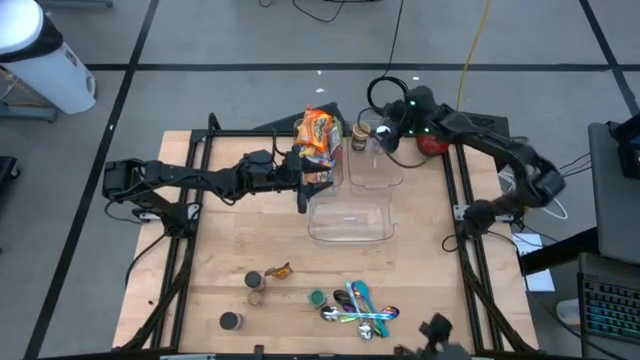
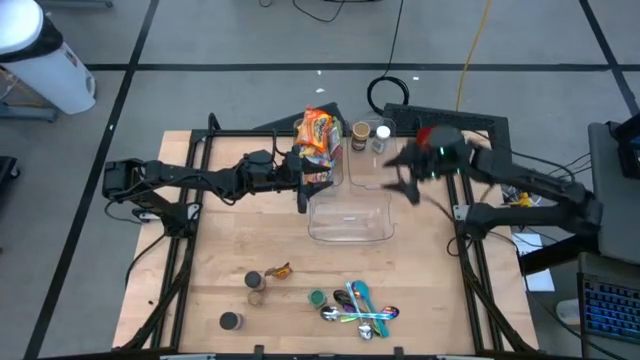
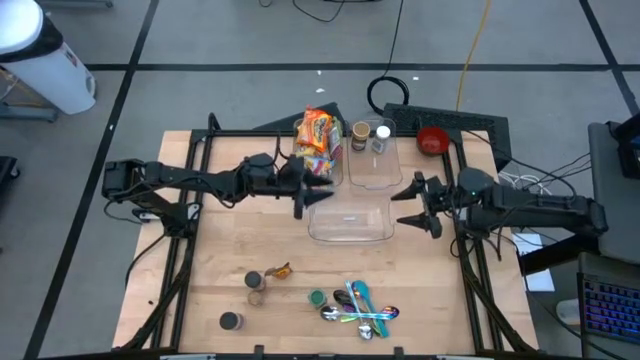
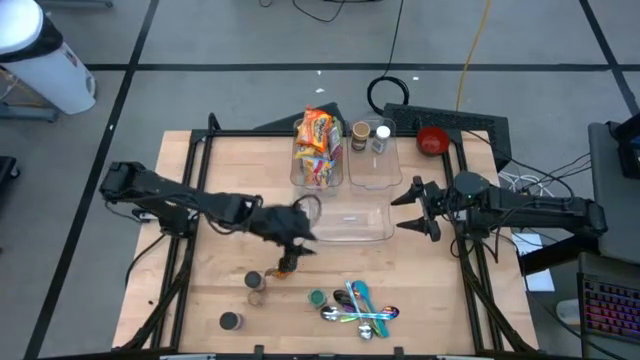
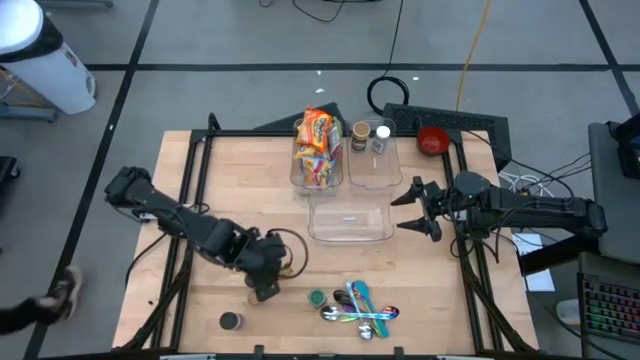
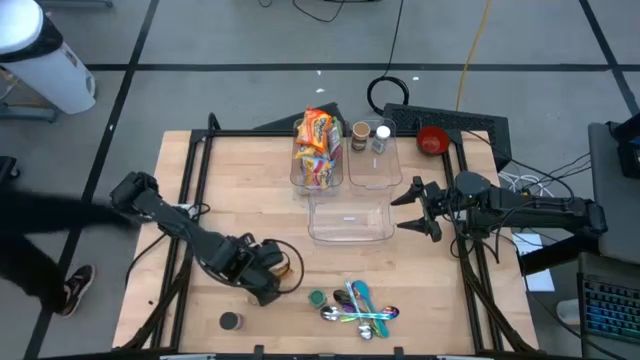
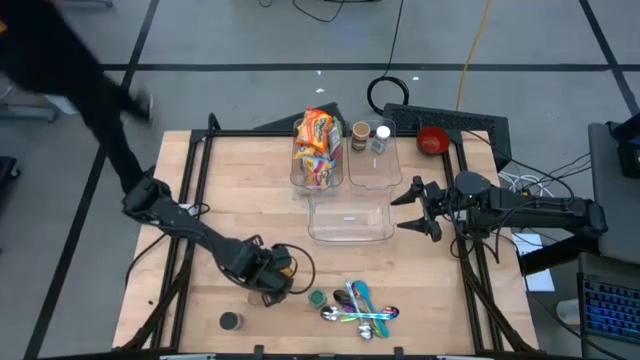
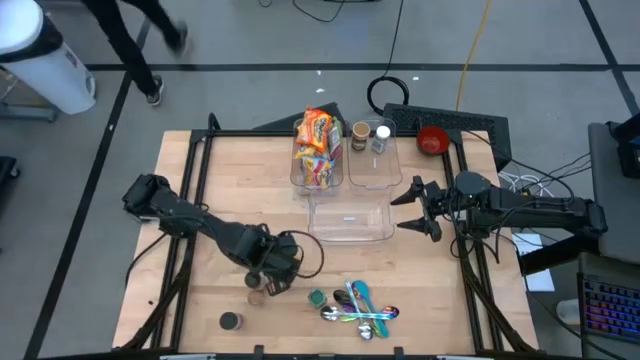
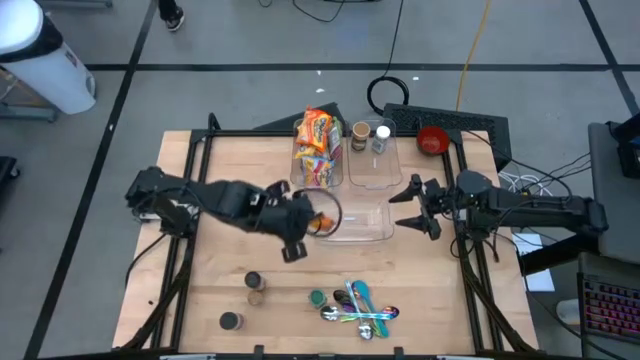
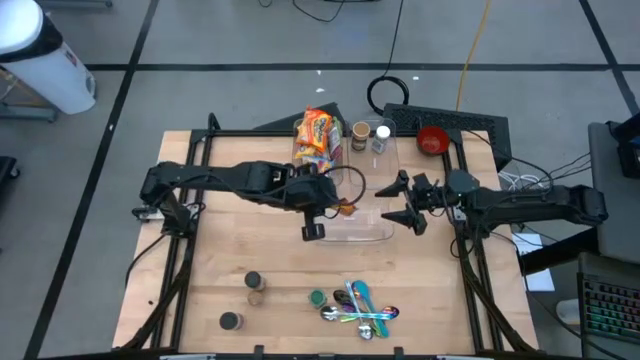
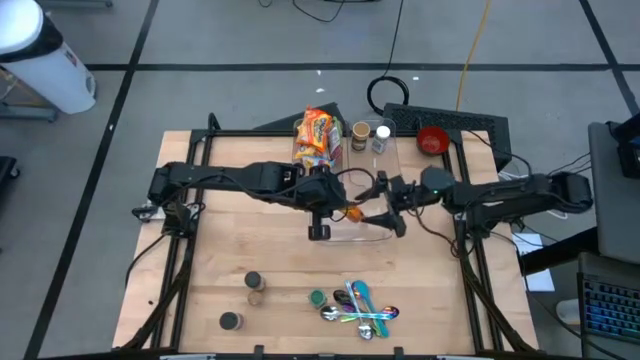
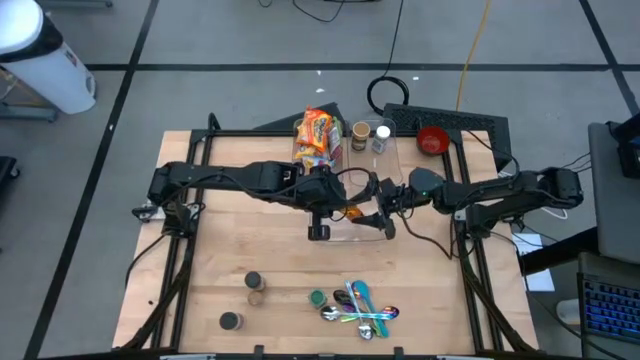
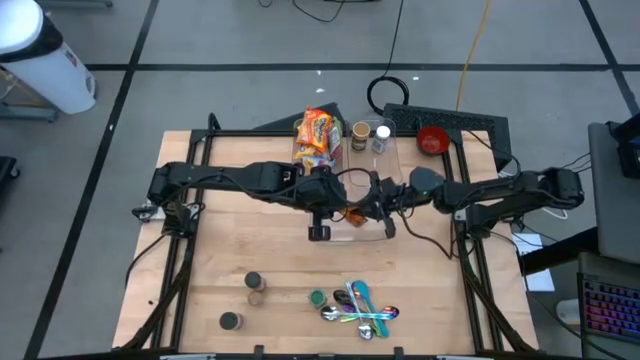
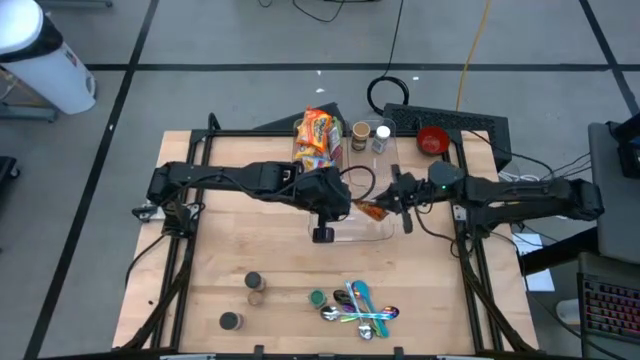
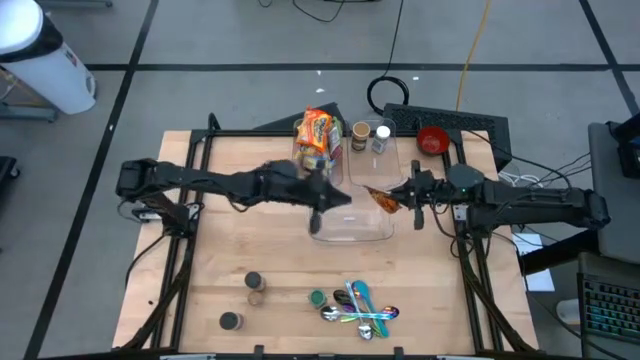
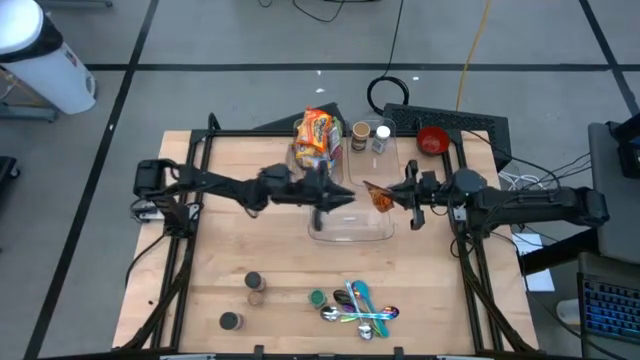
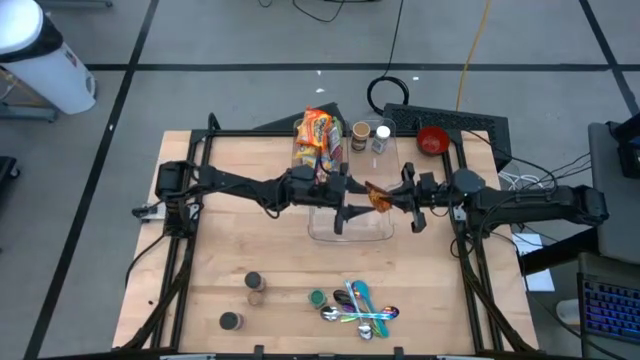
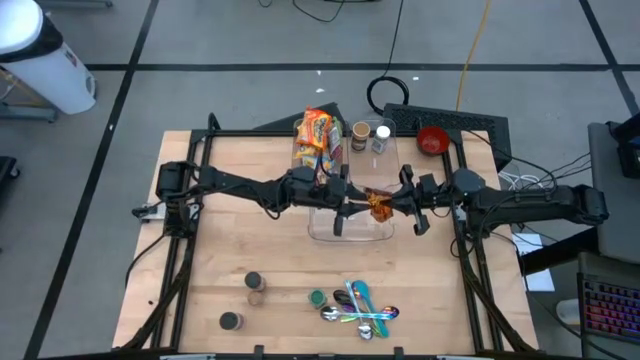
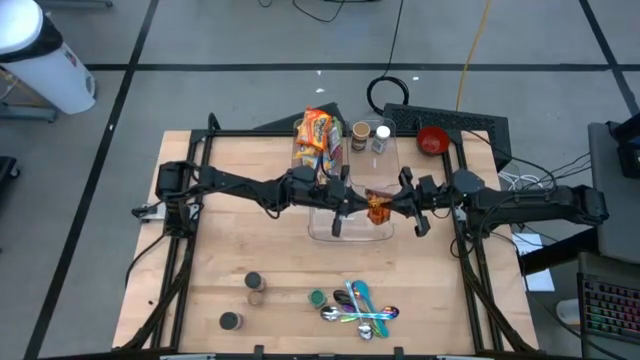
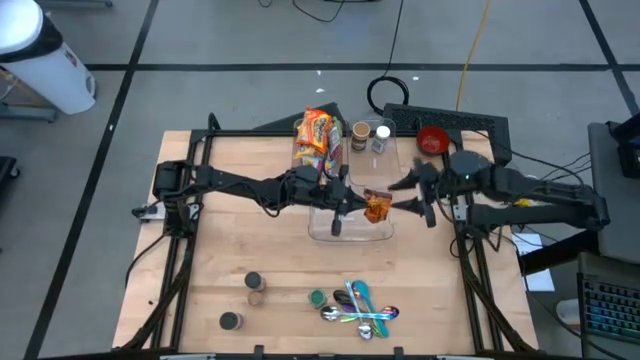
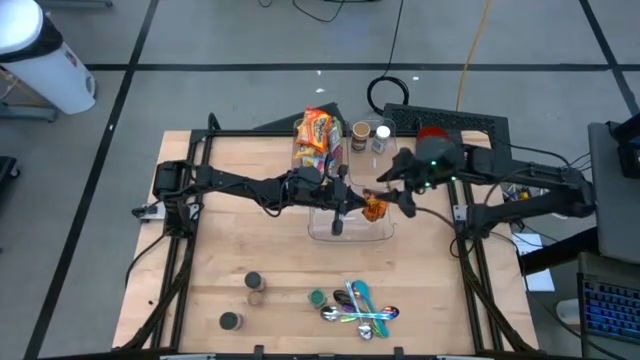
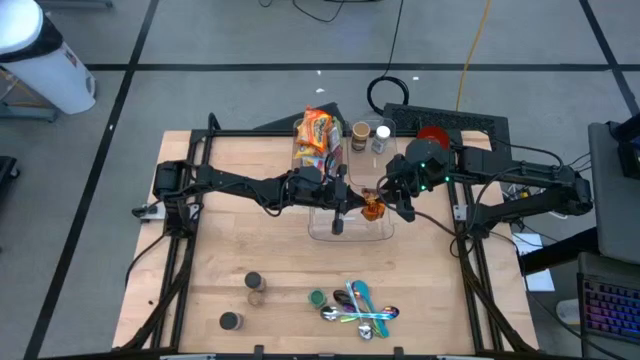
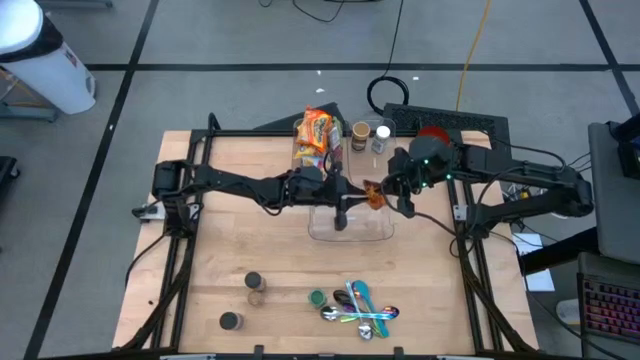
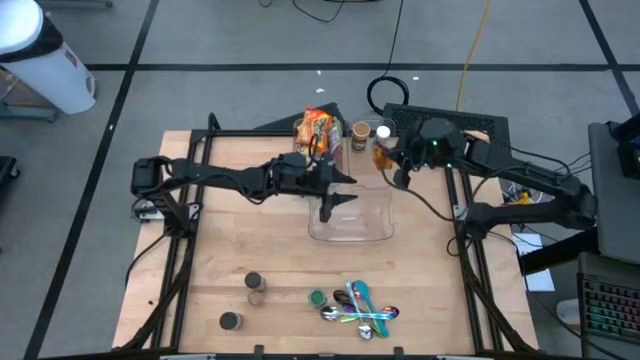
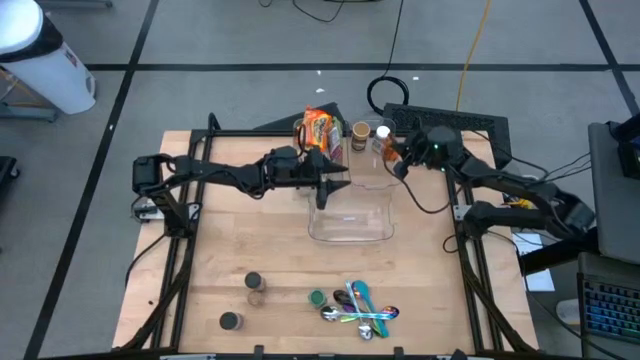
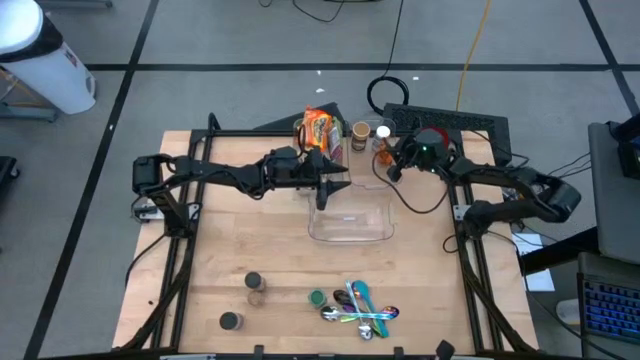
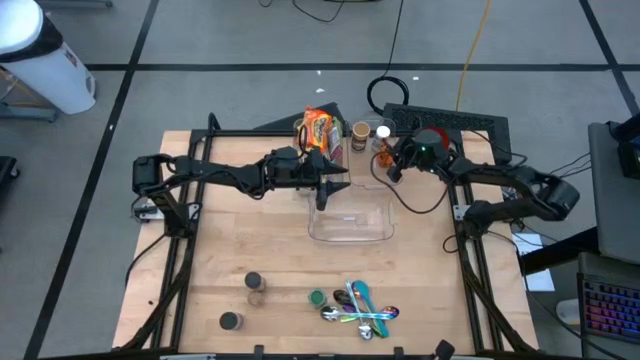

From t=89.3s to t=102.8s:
Task: Pick & Place Food Item
Put the orange seasoning bag into the right transparent bin

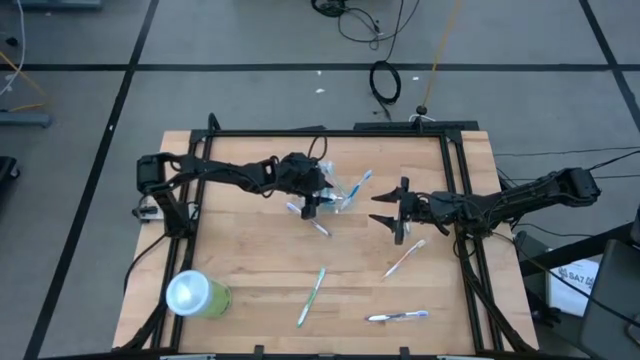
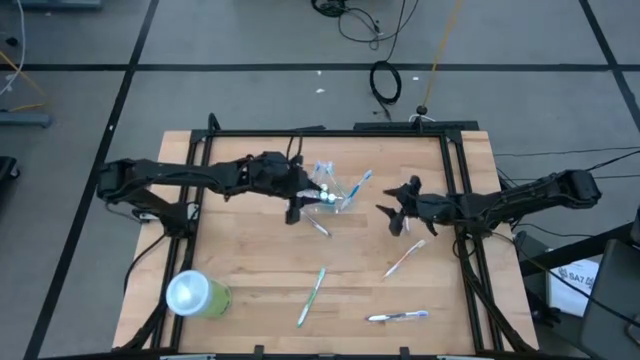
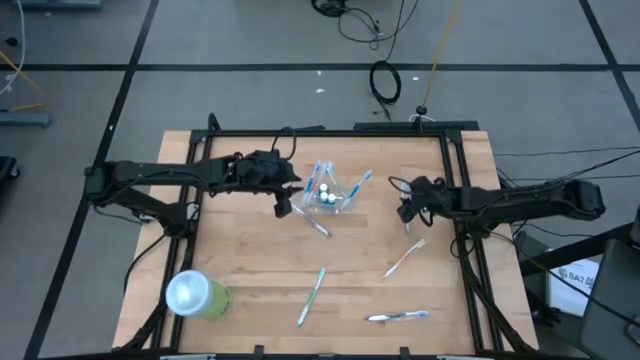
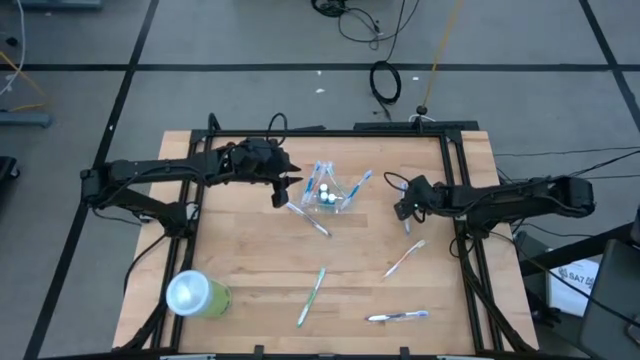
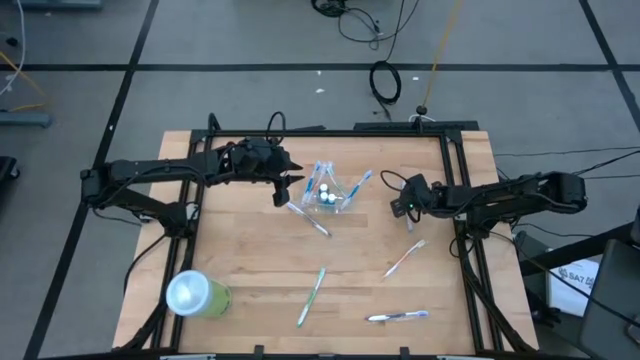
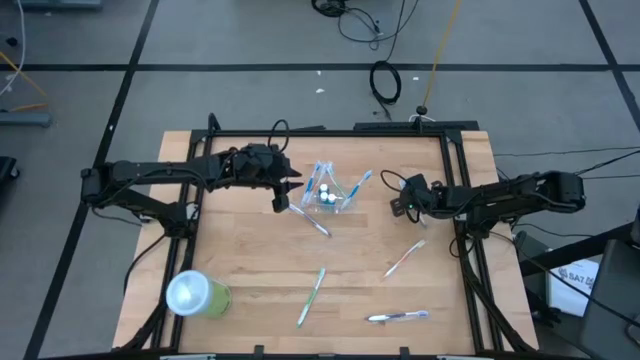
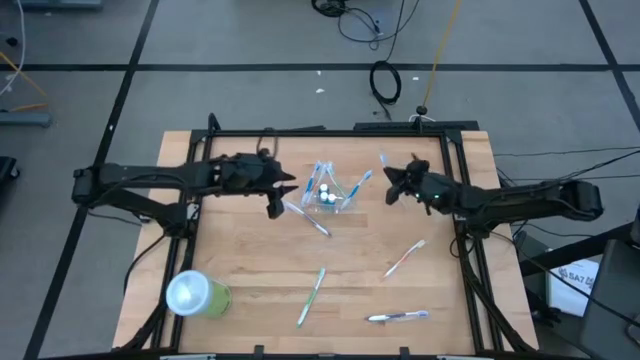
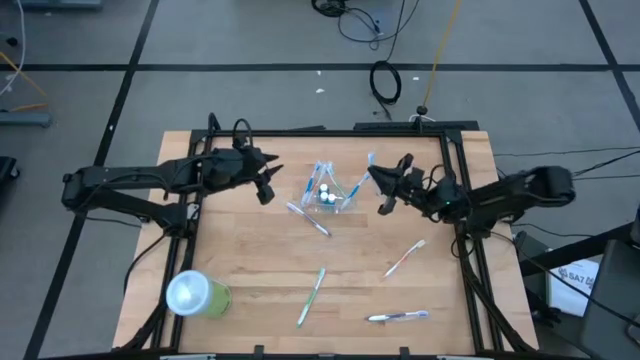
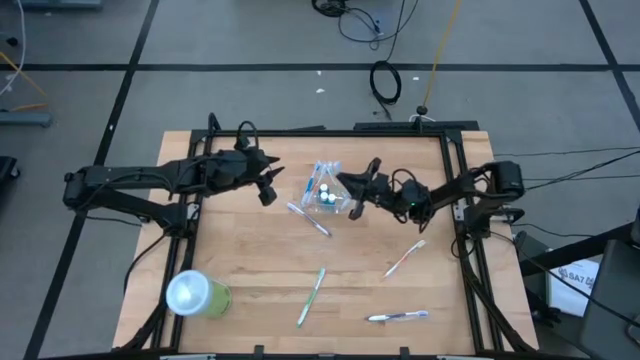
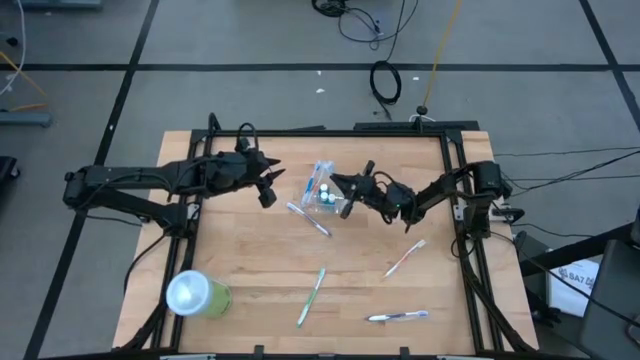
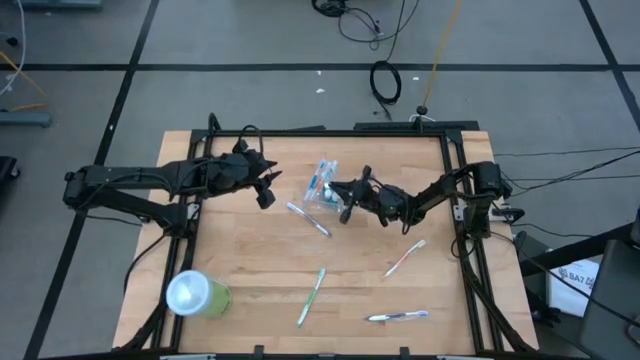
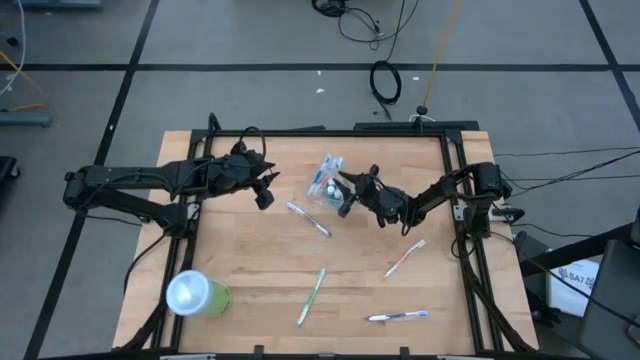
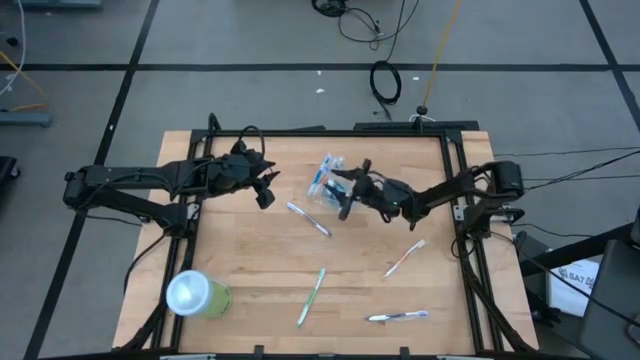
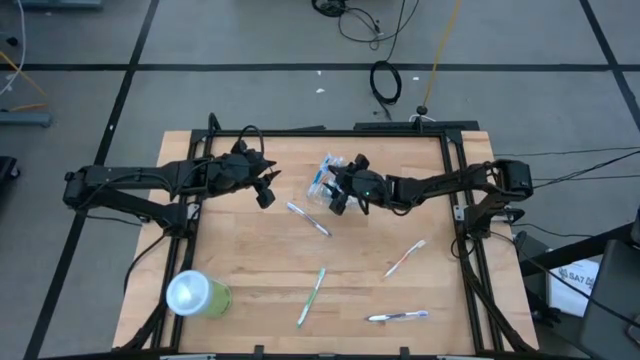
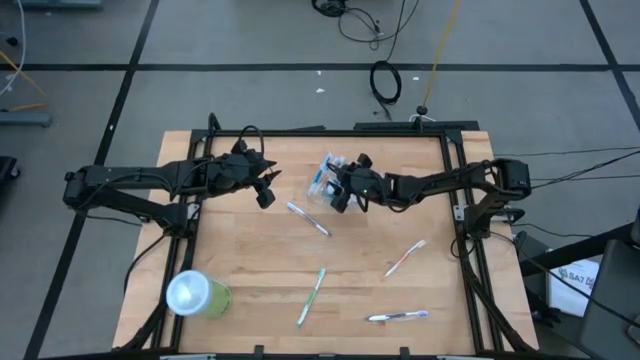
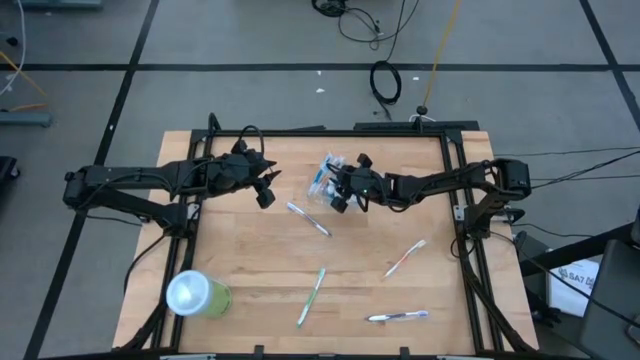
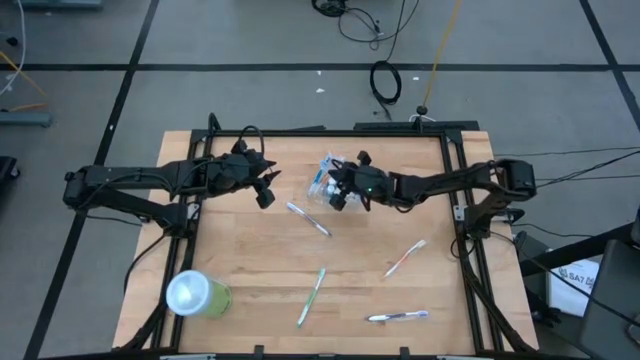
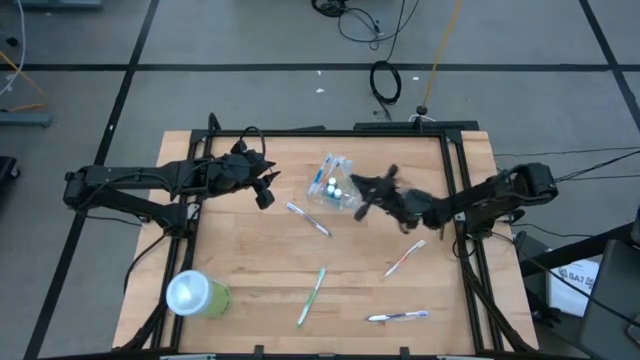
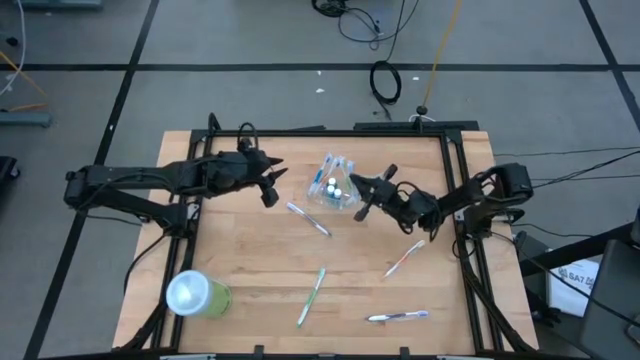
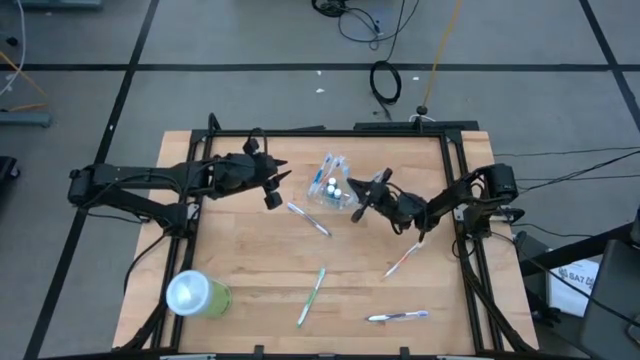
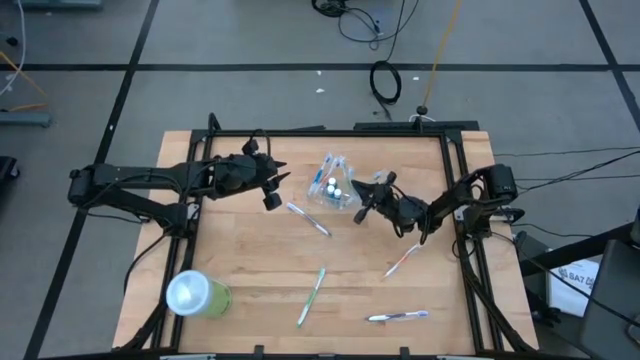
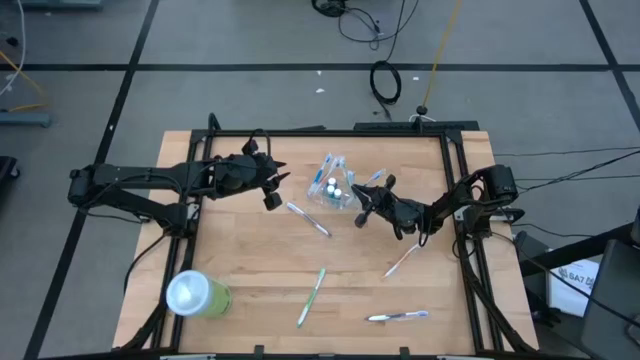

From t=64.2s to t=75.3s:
Task: Pick & Place toothbrushing station
Put the blue toothbrush into the transparent organizer
